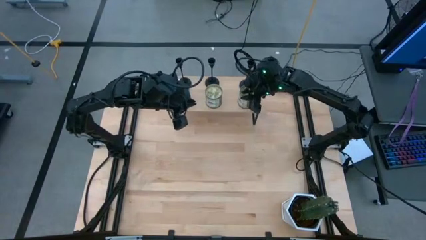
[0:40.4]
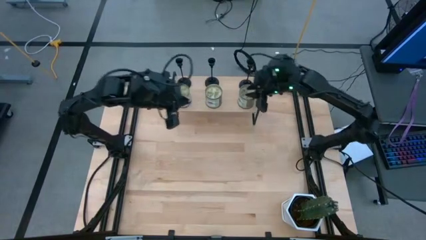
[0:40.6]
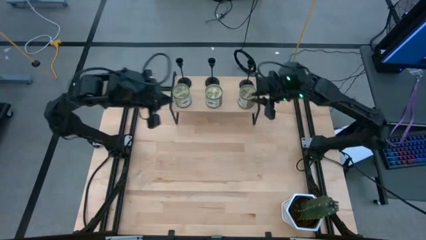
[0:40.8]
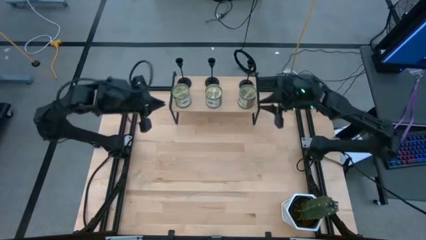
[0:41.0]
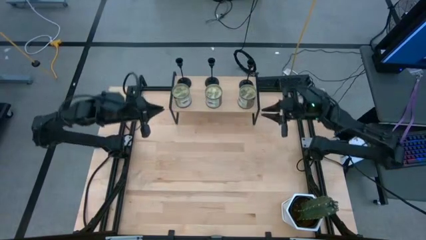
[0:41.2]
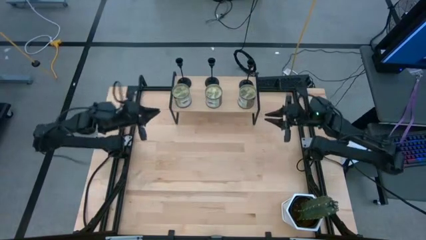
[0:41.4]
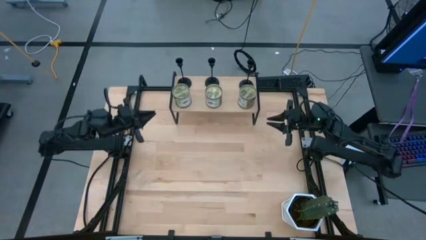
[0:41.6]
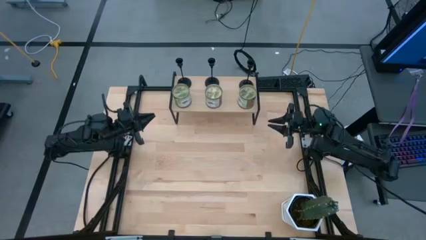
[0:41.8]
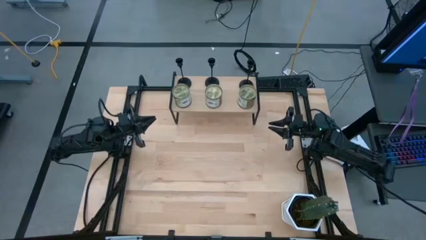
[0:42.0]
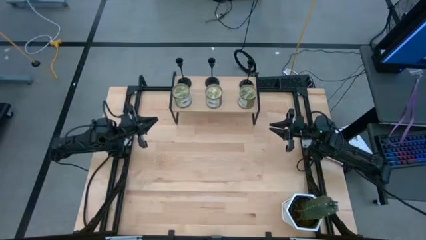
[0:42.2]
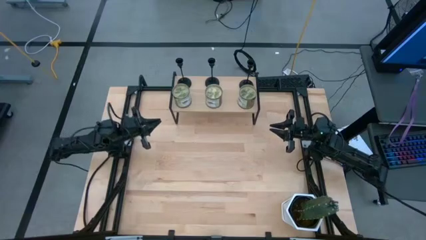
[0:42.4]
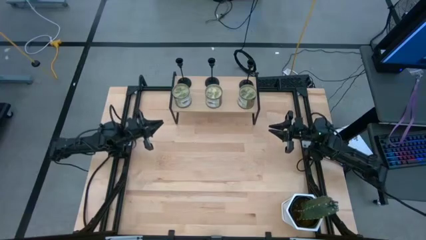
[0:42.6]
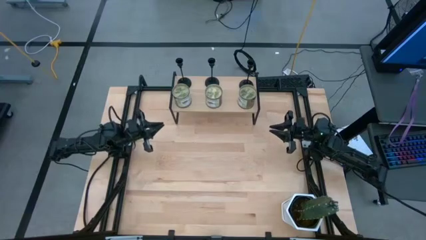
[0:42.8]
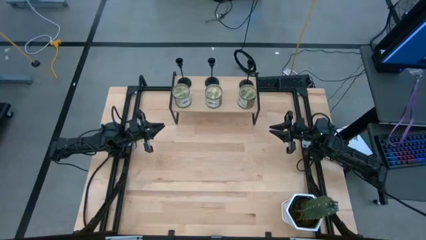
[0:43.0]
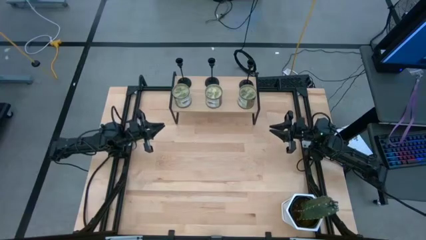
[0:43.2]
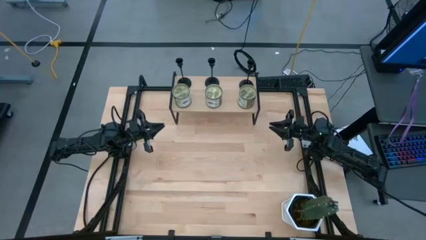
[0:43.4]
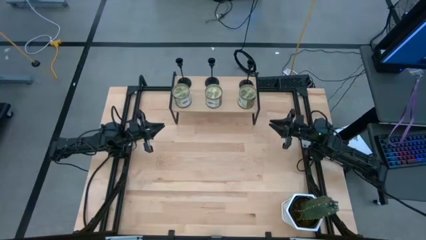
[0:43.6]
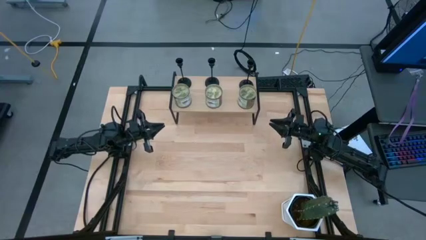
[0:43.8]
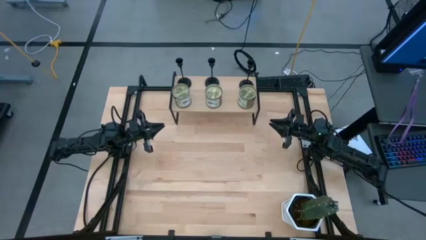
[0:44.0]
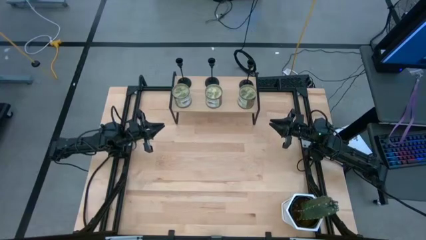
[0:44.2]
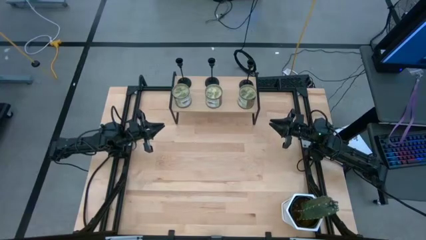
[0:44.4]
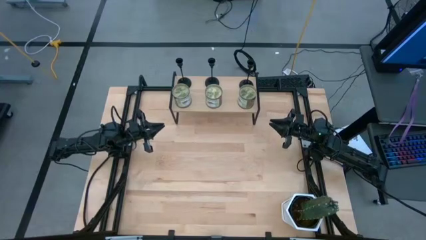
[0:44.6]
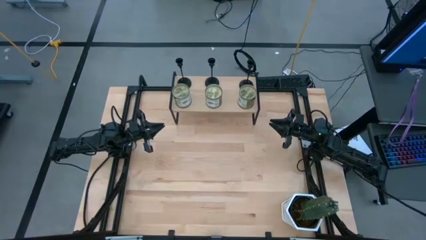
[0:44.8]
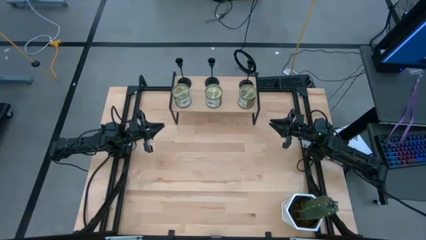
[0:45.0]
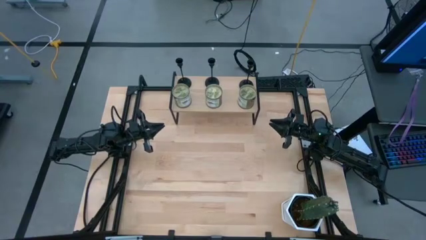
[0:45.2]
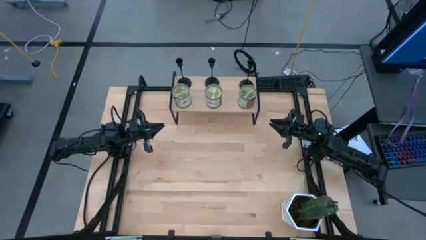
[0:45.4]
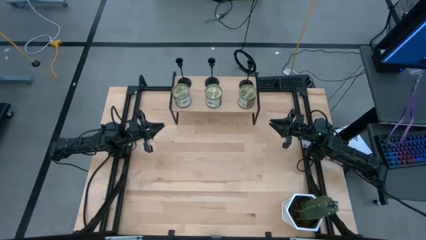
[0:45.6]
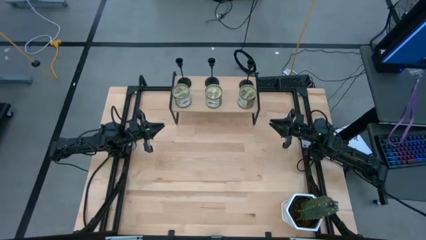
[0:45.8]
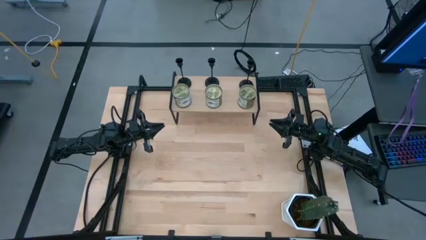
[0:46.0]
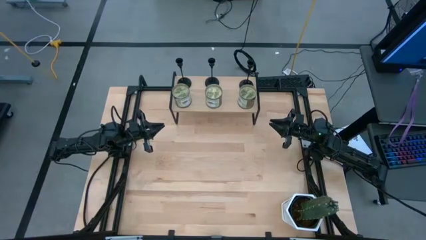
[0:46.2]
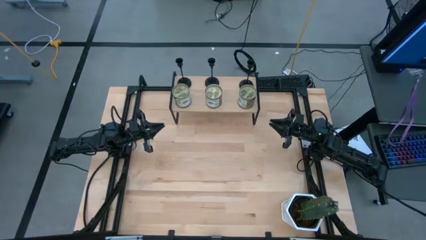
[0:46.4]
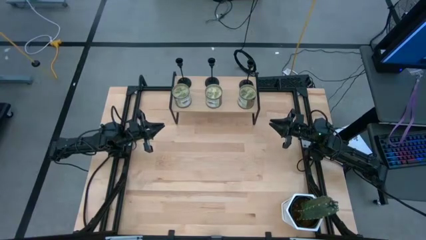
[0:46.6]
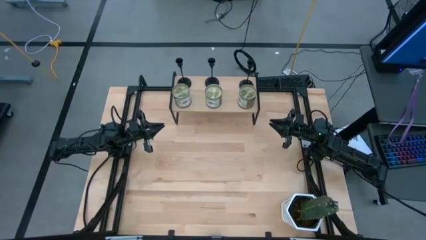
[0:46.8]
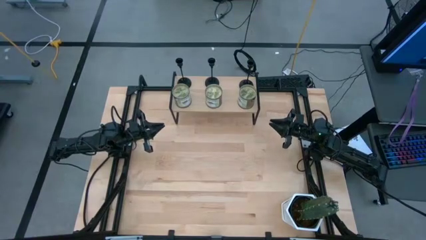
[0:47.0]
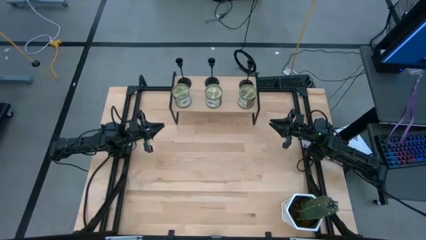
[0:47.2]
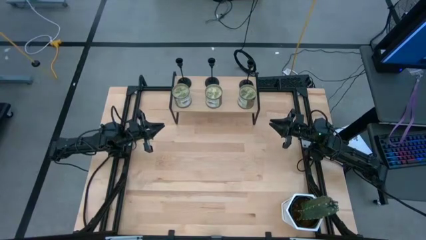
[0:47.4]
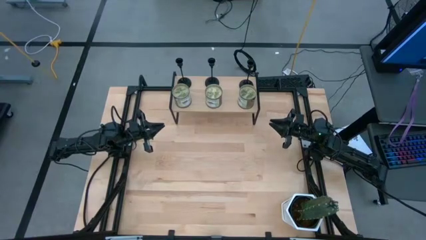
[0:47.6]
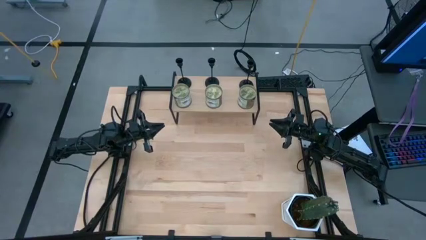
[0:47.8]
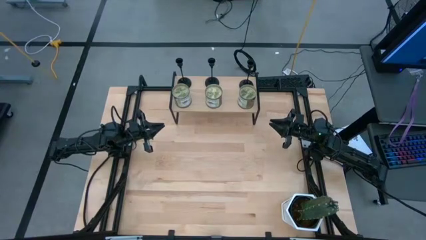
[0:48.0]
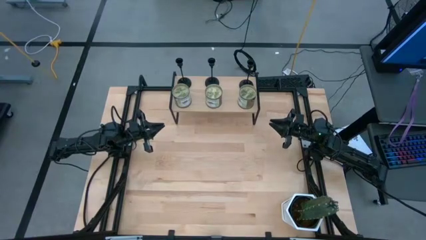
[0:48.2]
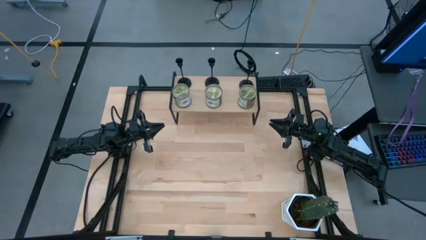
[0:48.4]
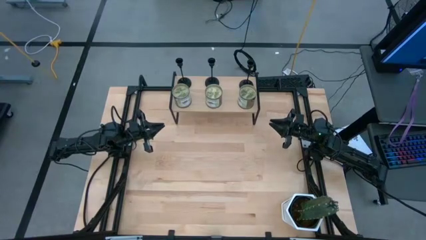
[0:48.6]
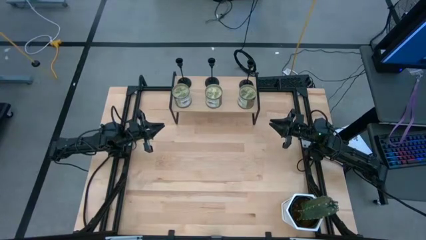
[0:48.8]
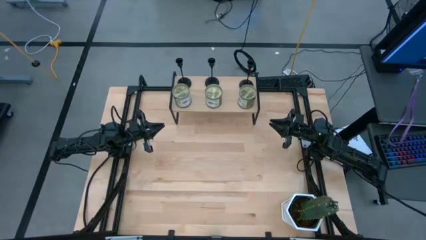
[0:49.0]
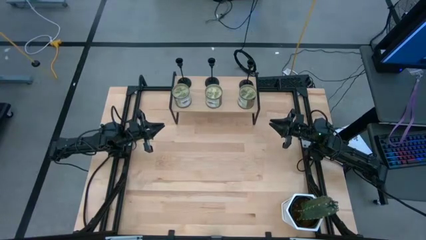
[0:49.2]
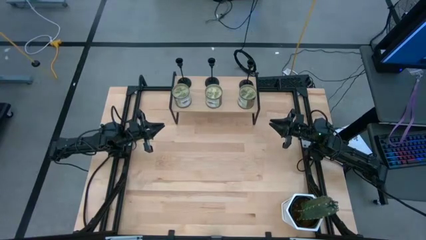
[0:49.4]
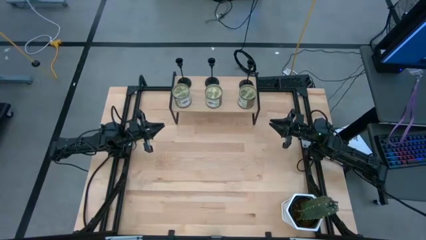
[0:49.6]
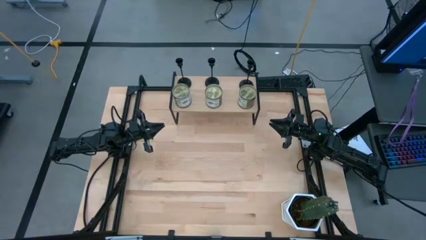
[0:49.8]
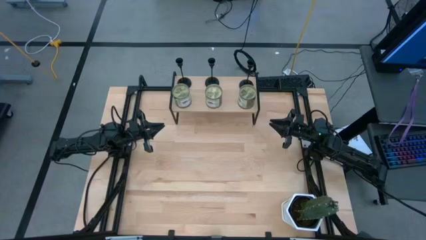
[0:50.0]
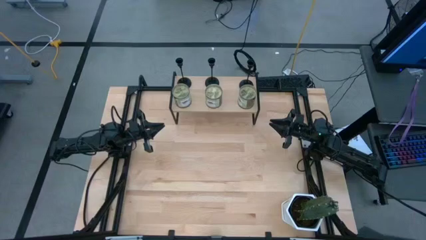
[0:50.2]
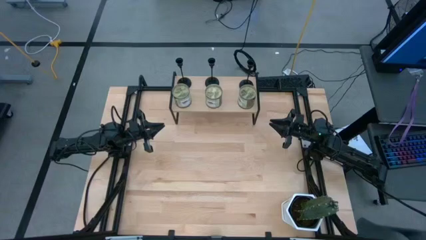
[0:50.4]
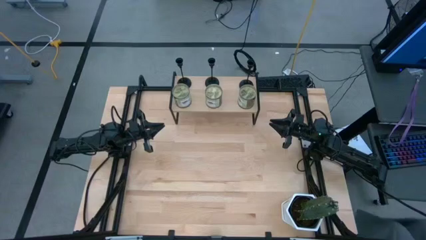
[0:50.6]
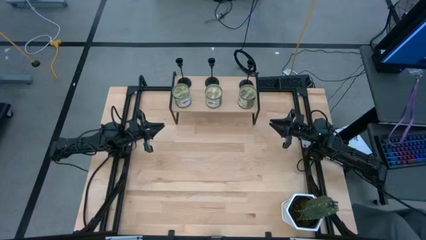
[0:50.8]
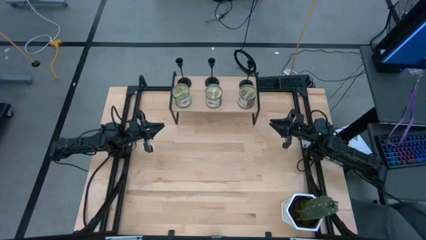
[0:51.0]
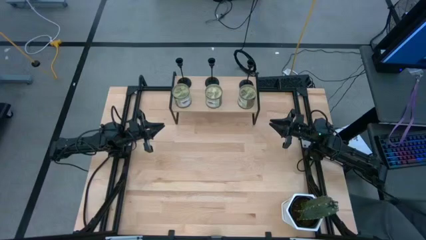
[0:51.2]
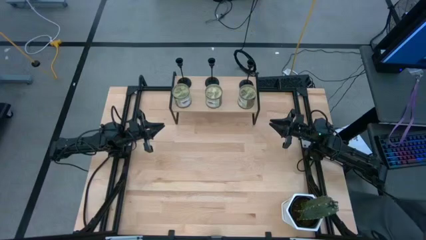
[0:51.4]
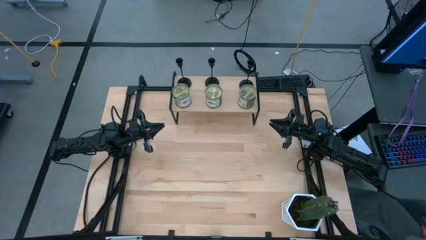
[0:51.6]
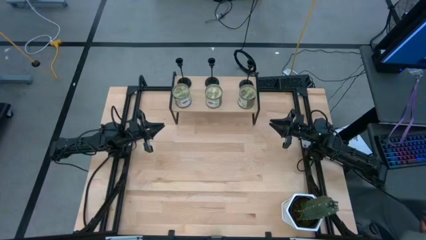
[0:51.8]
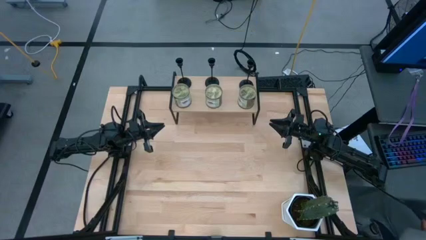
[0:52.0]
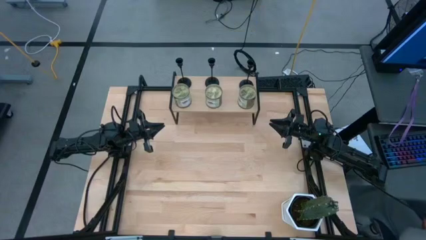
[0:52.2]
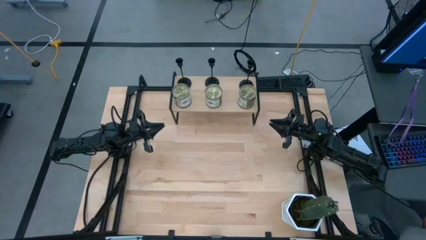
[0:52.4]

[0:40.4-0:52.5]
Task: Pick & Place candle stick holders
Return to Home Position
